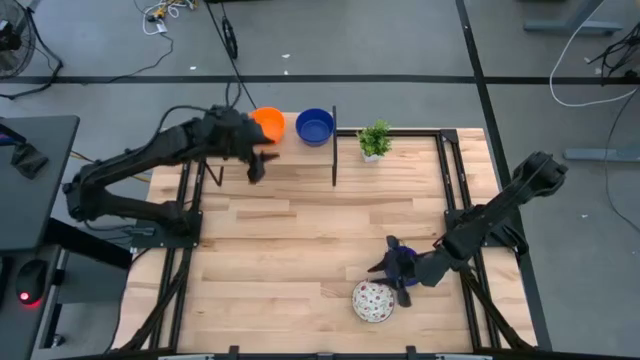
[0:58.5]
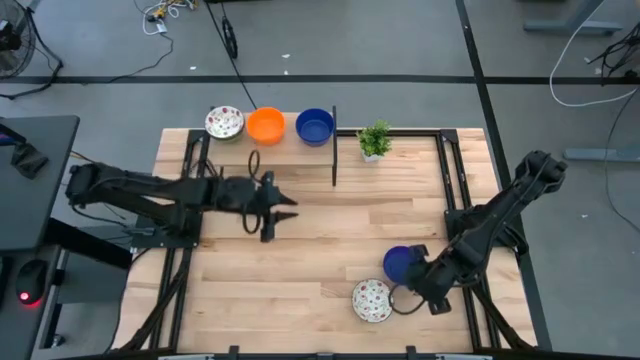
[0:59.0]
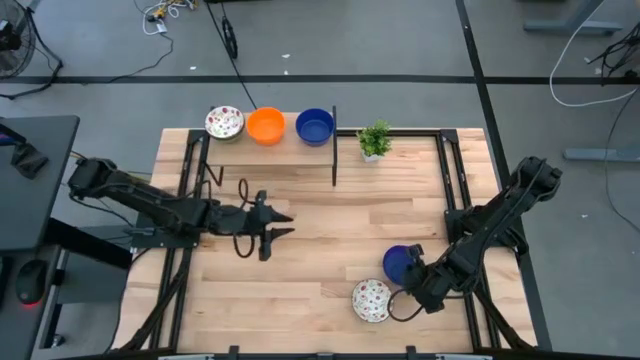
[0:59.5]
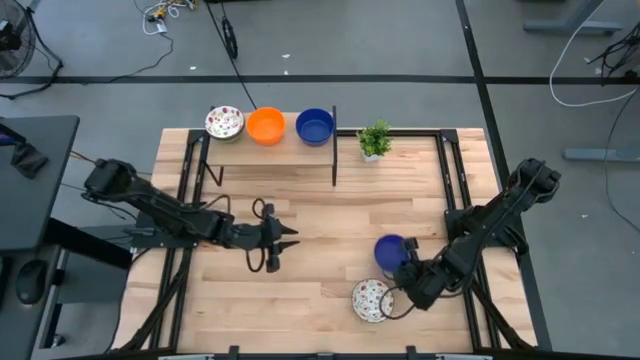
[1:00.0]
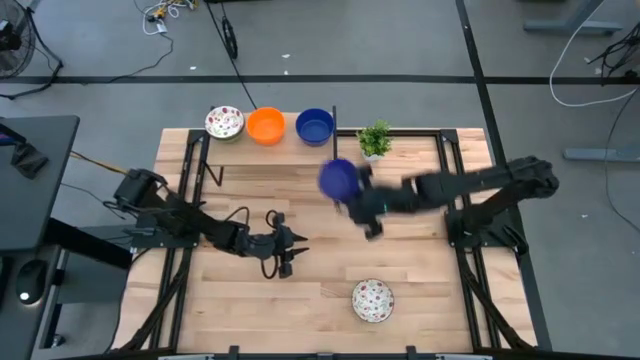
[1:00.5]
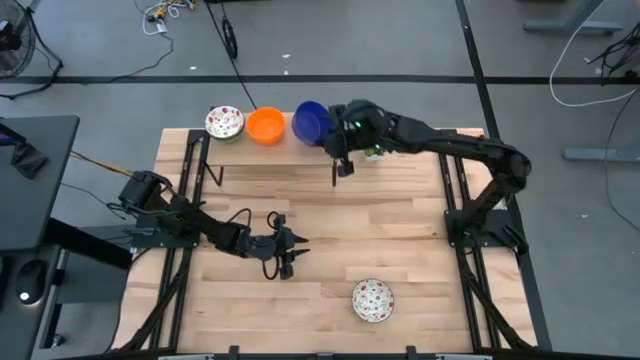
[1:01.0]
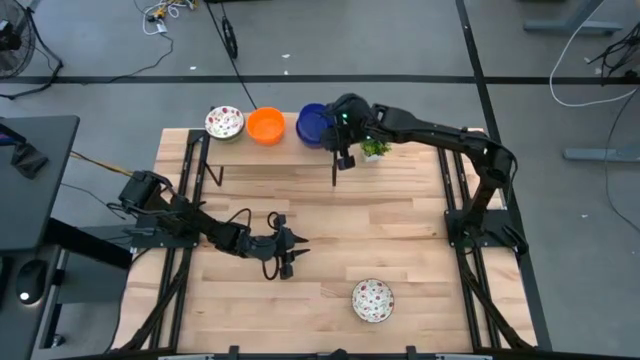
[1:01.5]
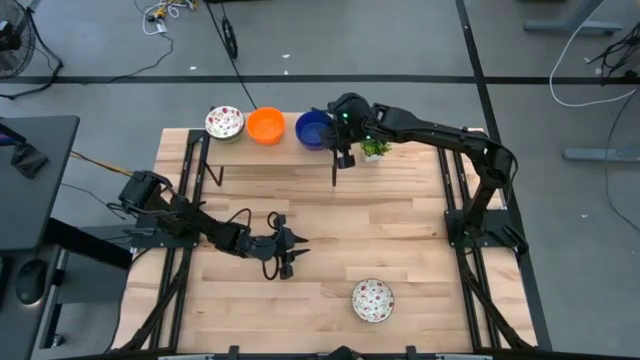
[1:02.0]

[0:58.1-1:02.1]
Task: Pick & Place Mini bowls
Stack the blue bowl on top of the stacked blue bowls on the shelf

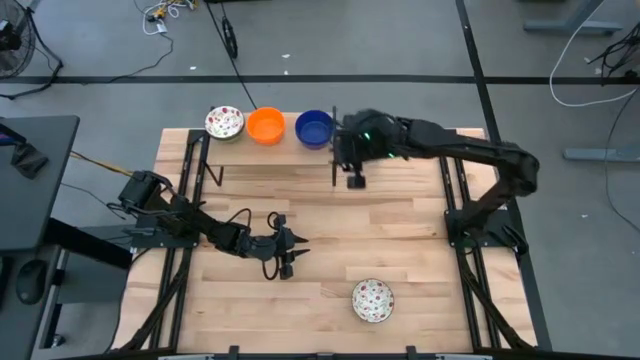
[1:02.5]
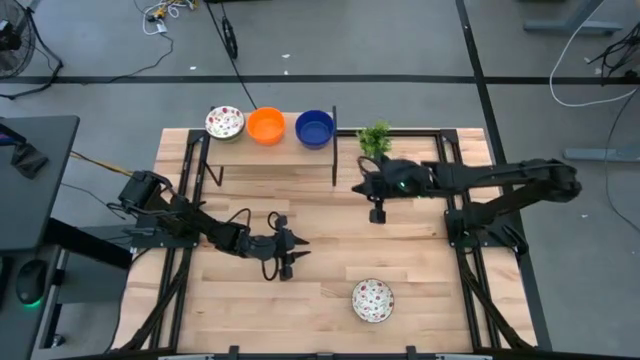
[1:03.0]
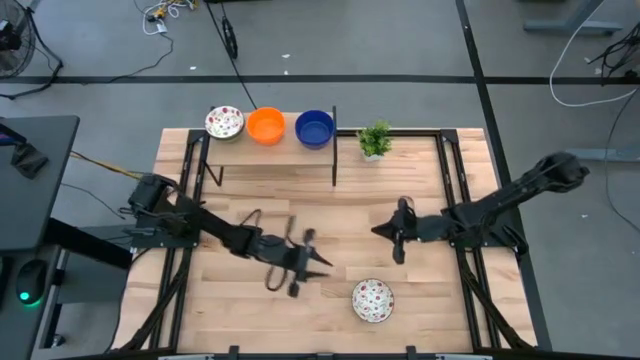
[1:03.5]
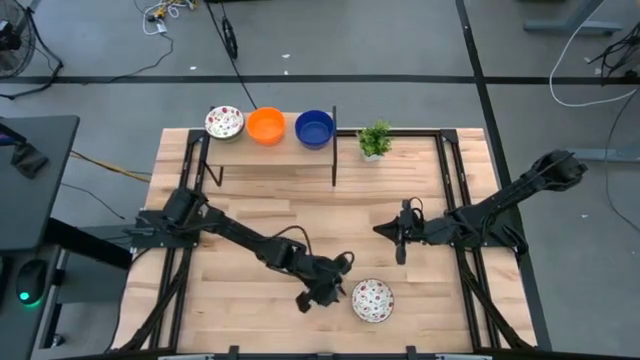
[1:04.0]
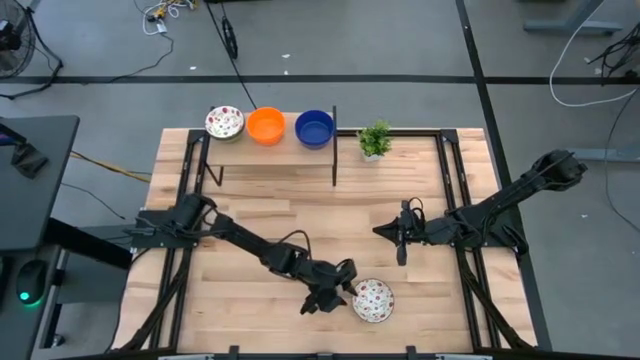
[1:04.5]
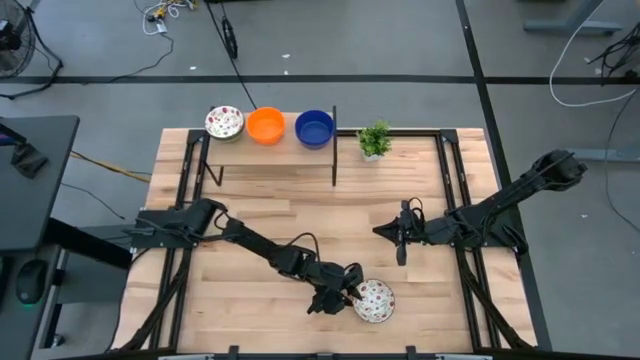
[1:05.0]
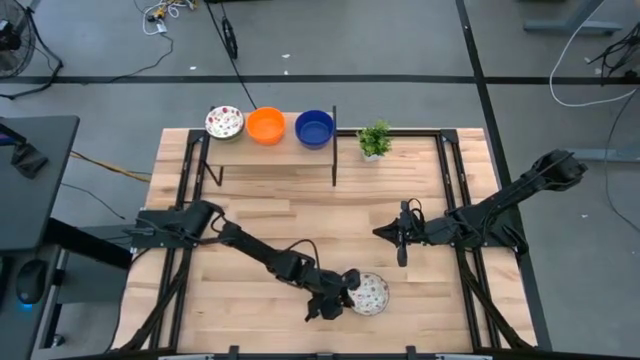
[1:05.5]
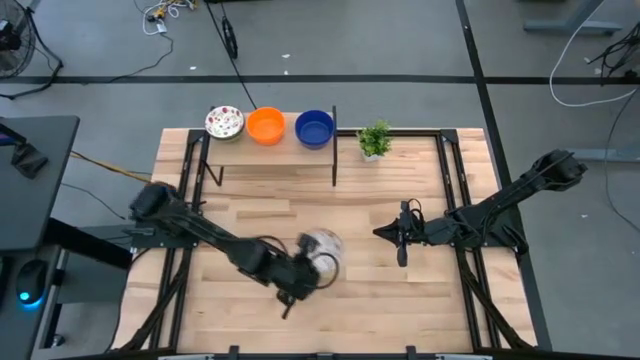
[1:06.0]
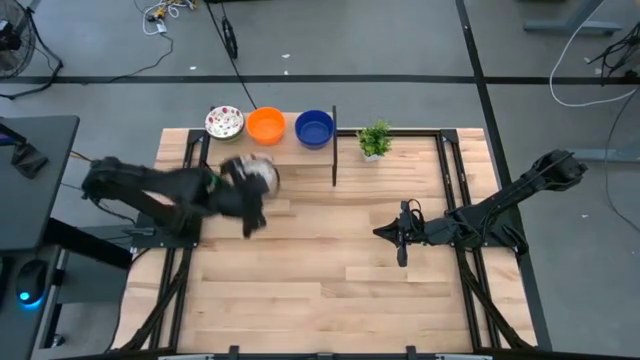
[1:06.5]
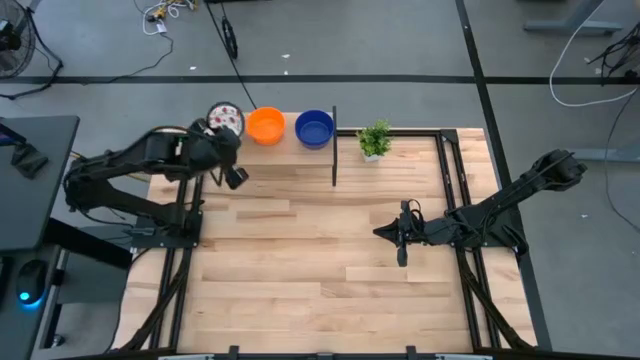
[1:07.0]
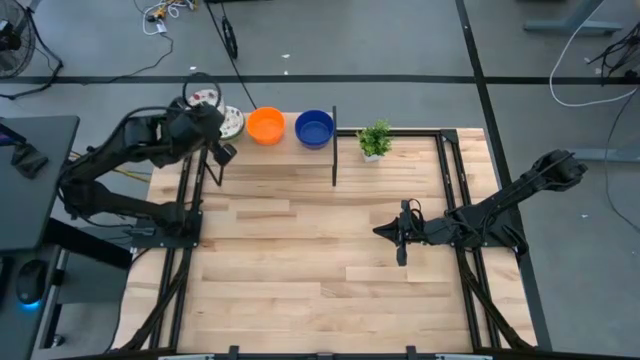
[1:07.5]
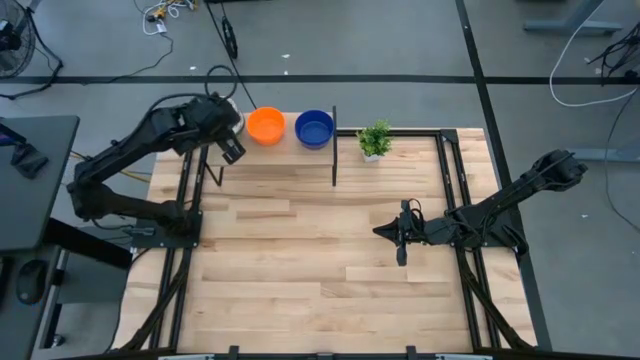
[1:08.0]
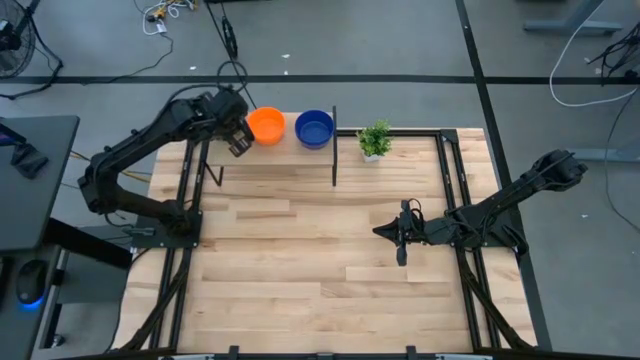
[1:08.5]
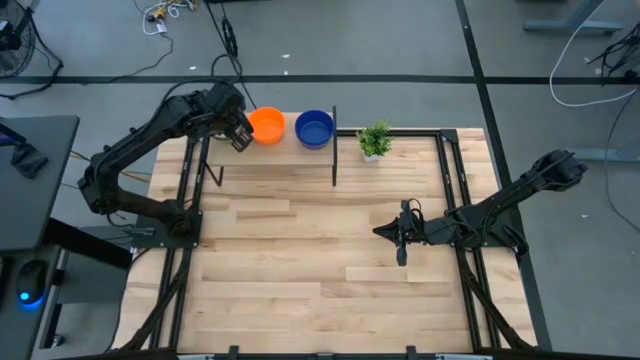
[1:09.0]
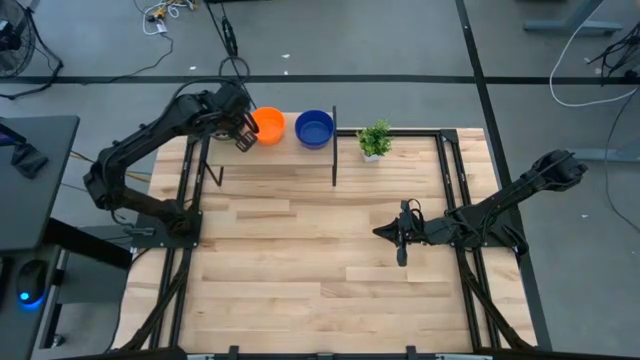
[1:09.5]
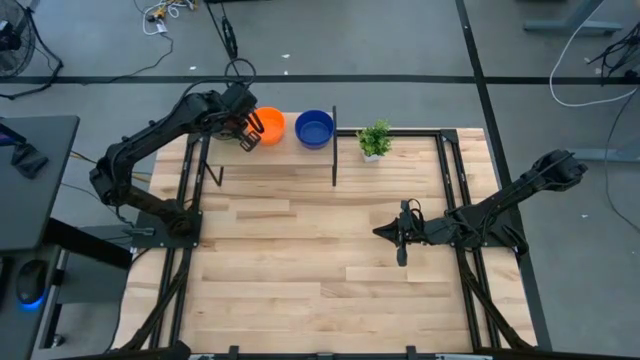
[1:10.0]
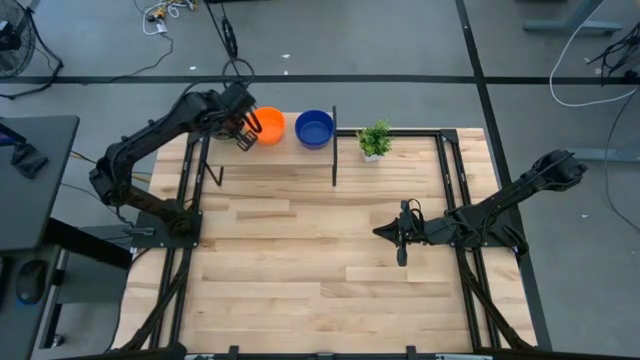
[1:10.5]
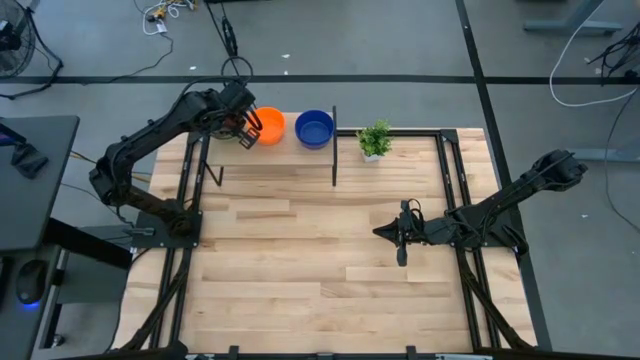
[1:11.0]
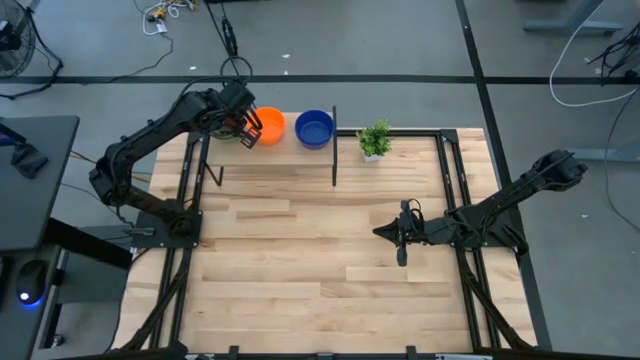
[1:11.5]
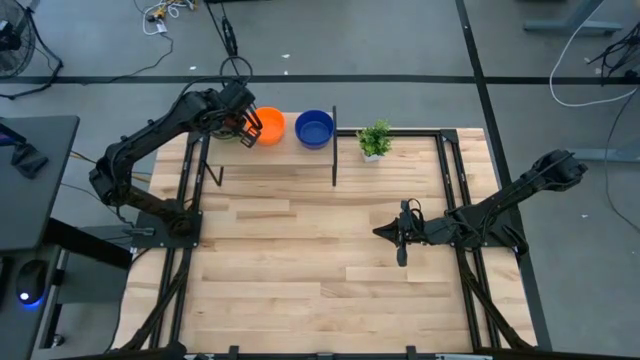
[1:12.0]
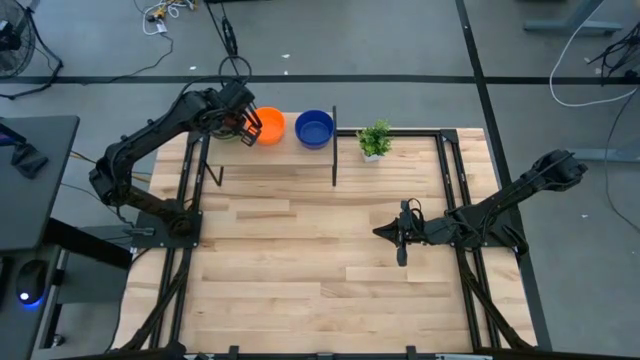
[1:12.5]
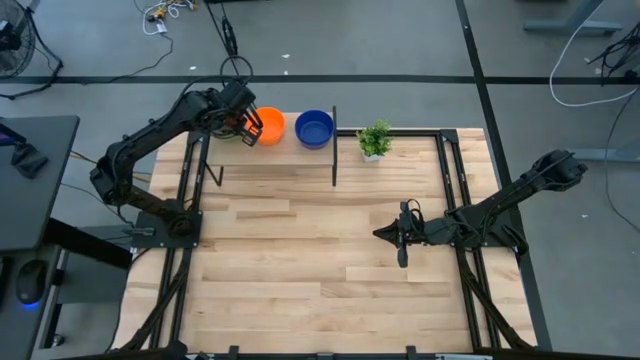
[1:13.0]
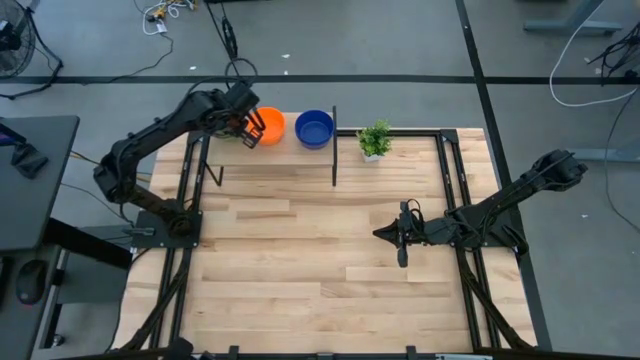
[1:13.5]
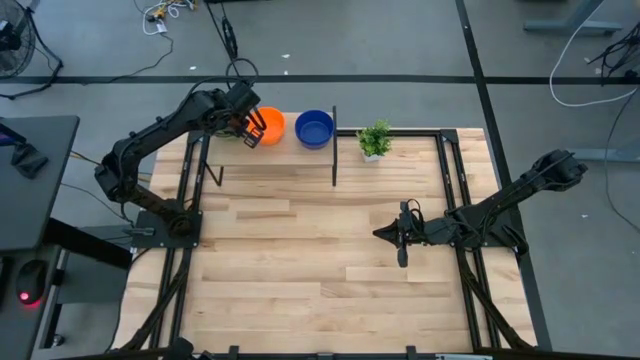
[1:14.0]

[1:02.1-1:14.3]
Stack the white bowl top the stacked white bowls on the shelf

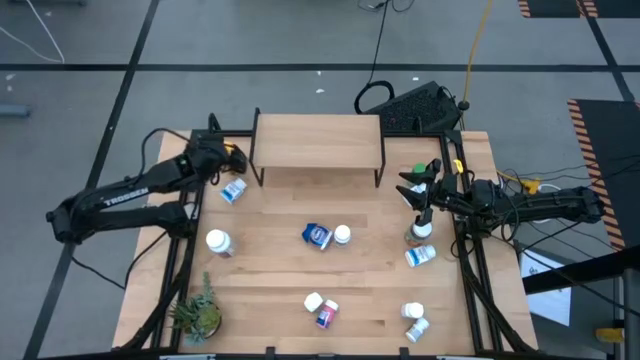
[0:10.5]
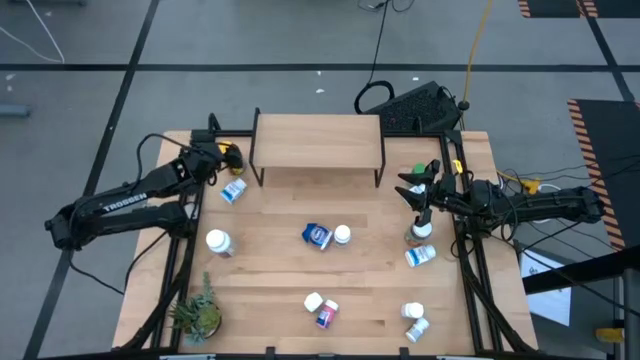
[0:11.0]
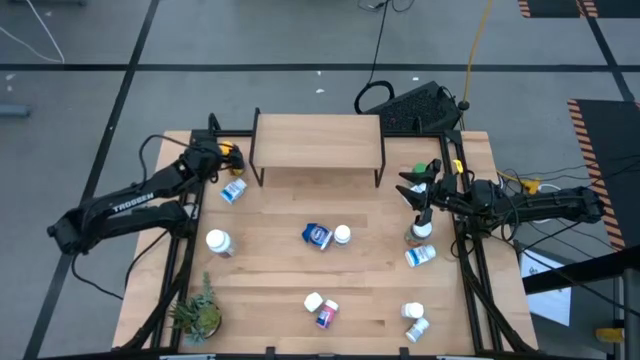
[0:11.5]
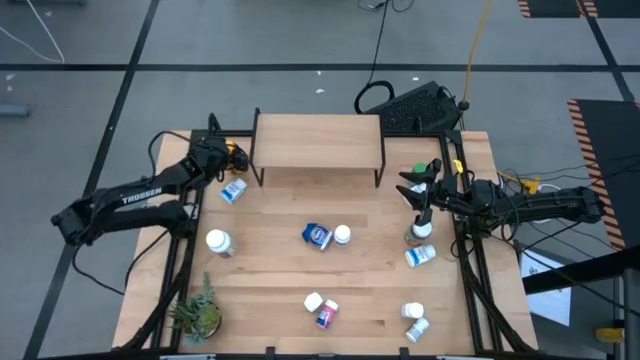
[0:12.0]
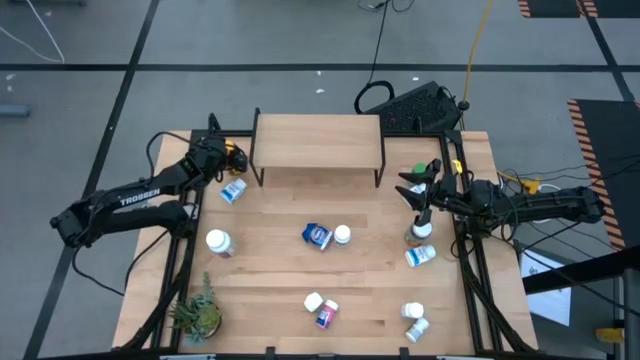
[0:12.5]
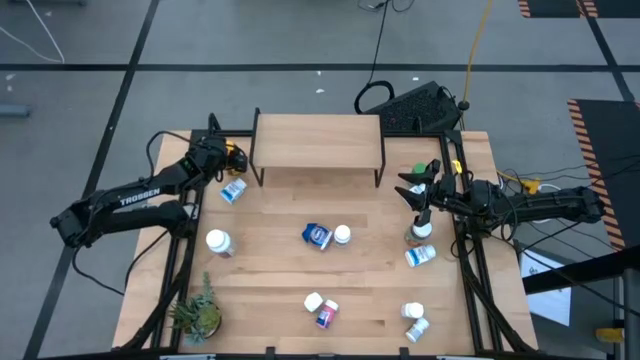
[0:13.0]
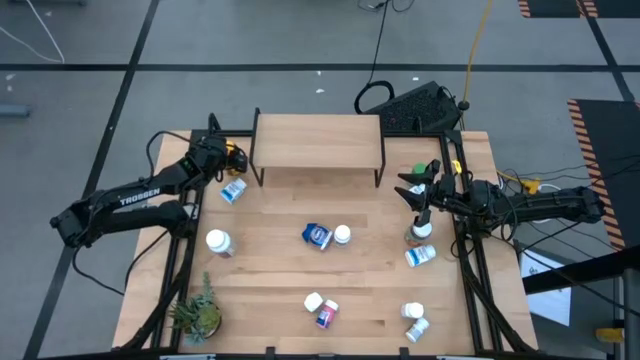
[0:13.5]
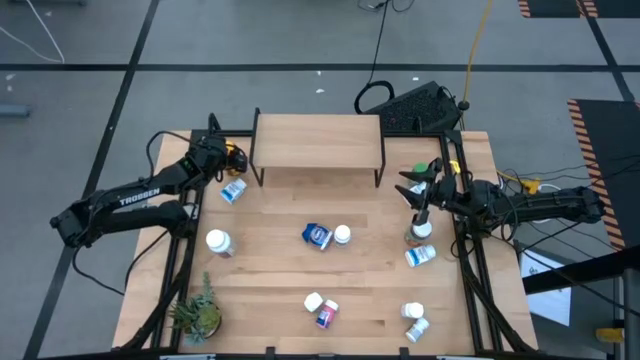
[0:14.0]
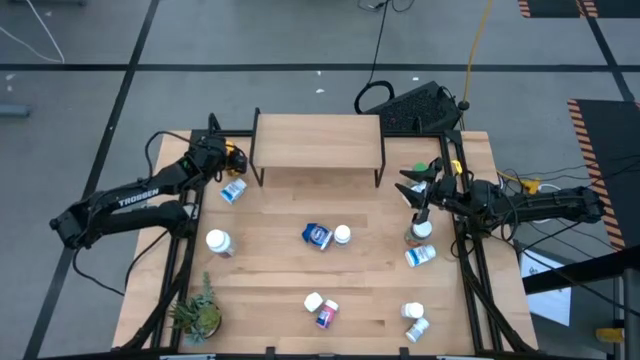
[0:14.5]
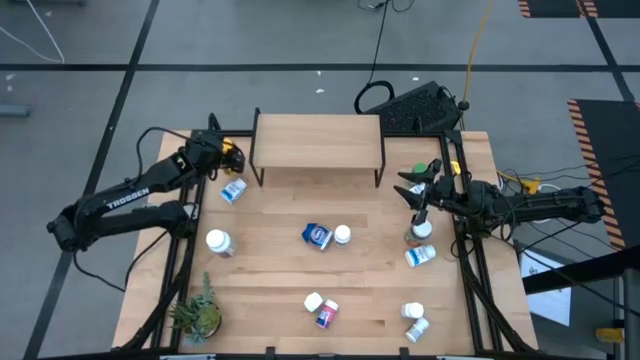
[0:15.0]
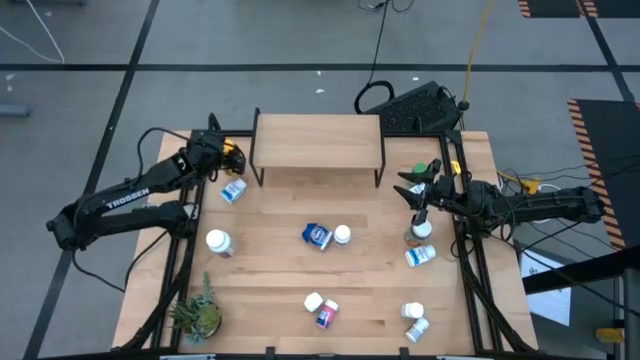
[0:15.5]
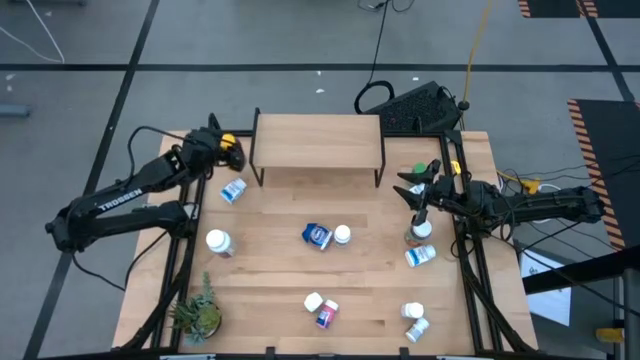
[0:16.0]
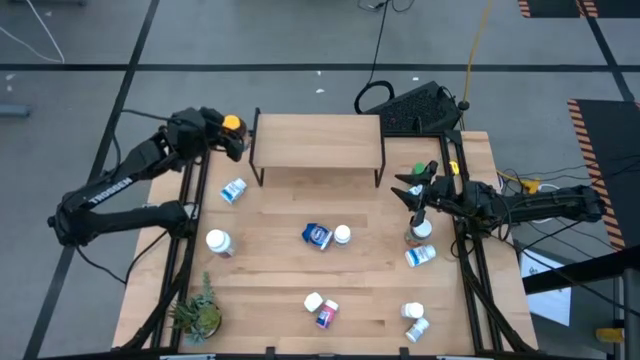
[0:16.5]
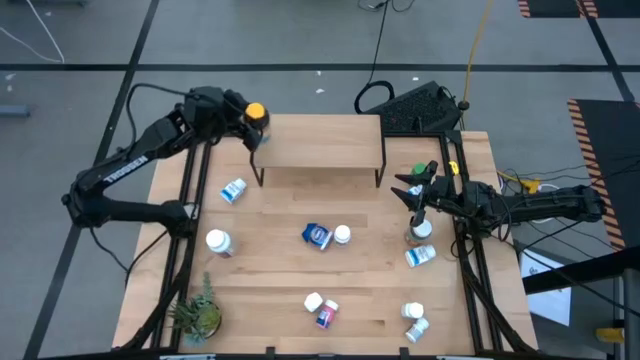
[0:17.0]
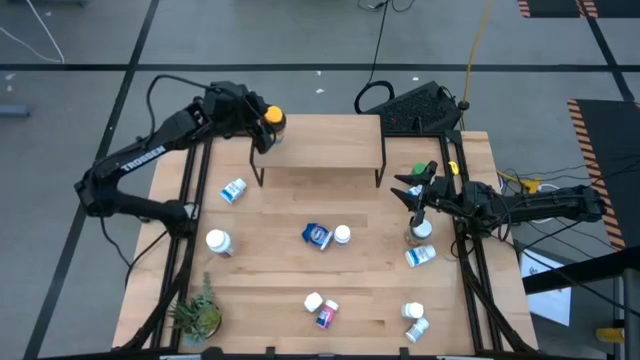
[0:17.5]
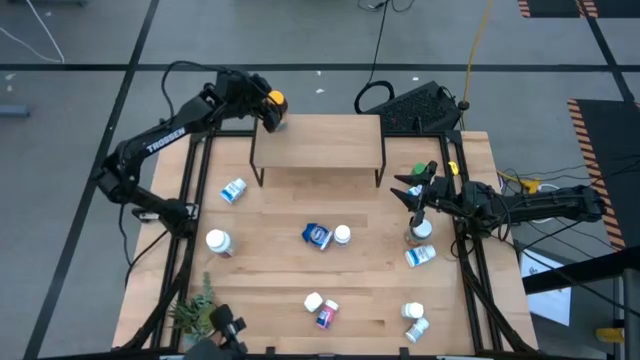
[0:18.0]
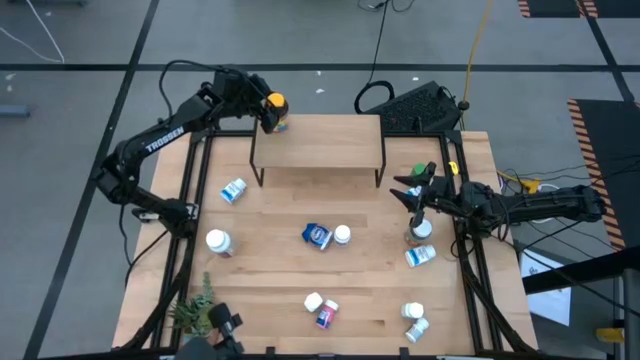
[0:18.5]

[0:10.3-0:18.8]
Task: Pick and place medicine bottles onto shelf by color
Put the yellow medicine bottle on the shelf
